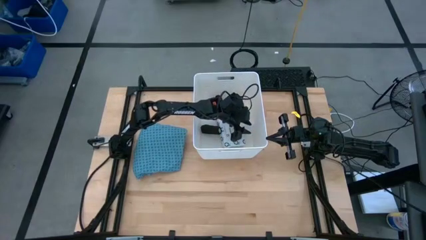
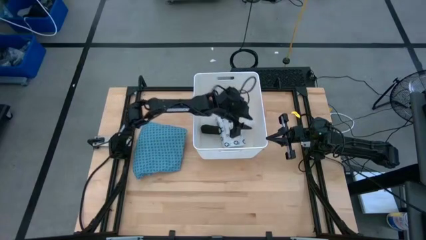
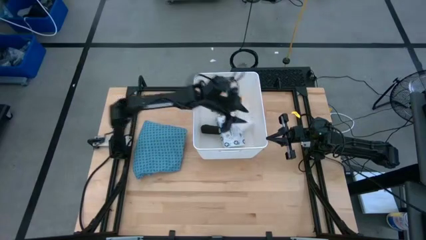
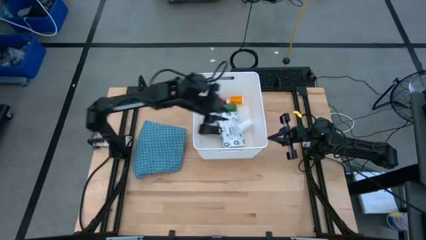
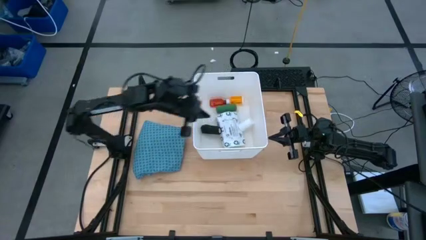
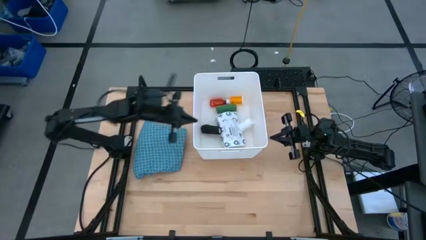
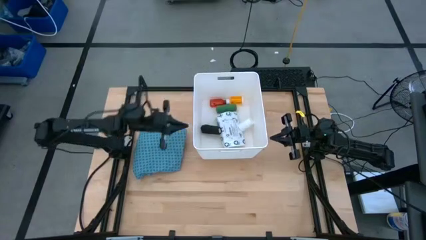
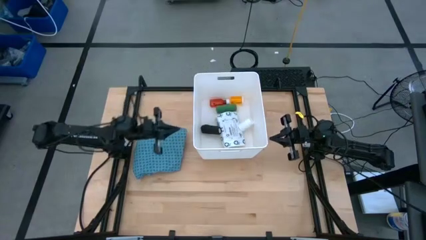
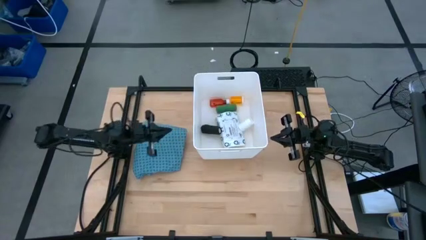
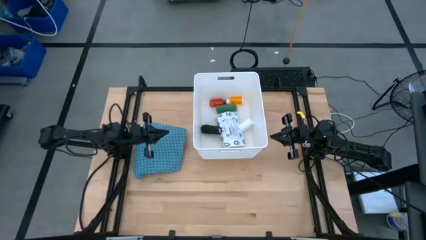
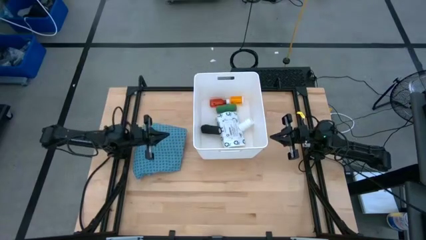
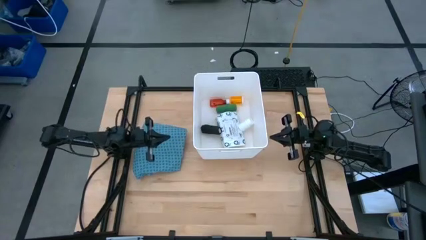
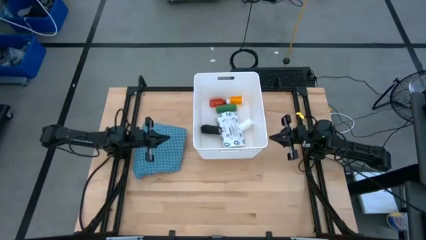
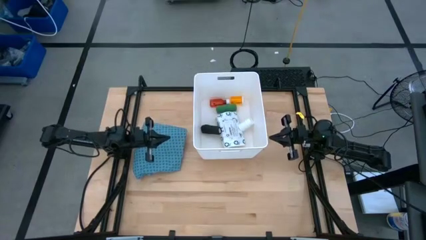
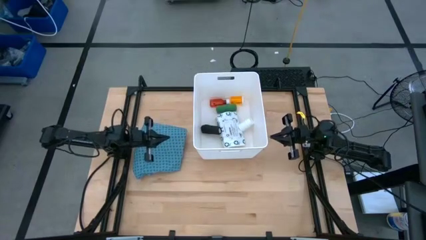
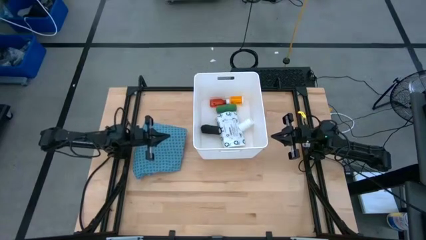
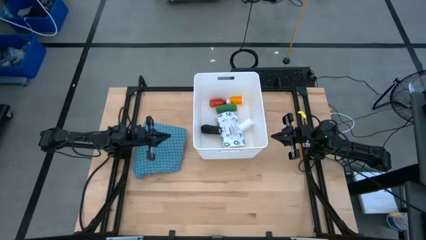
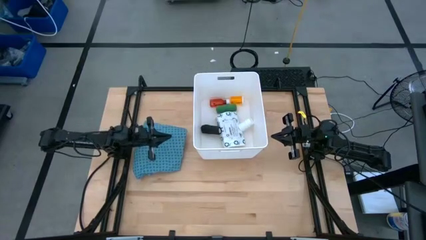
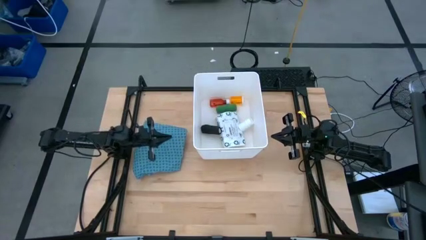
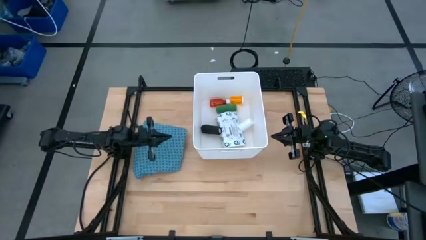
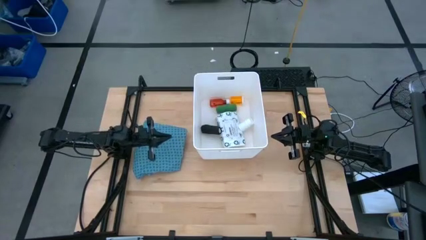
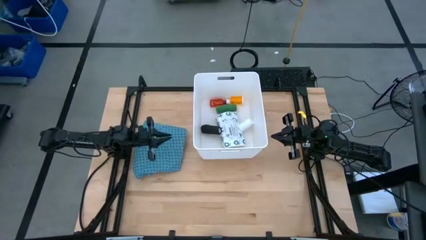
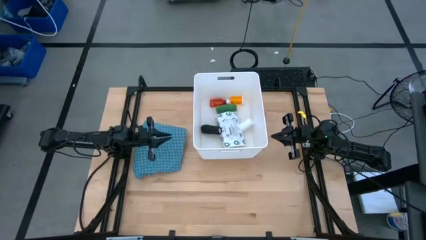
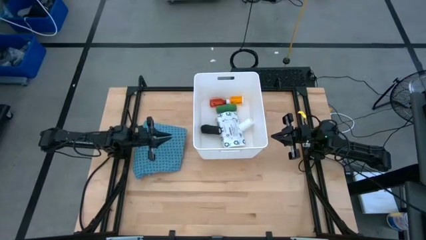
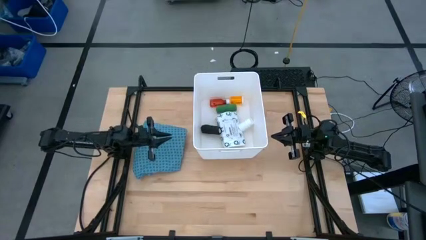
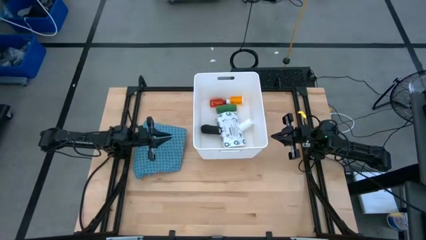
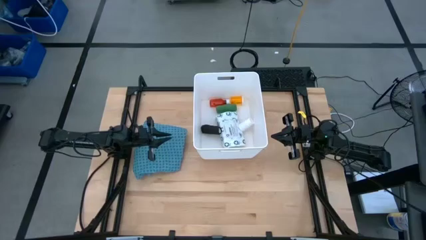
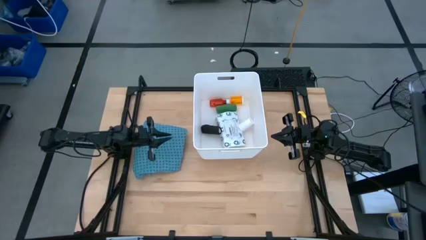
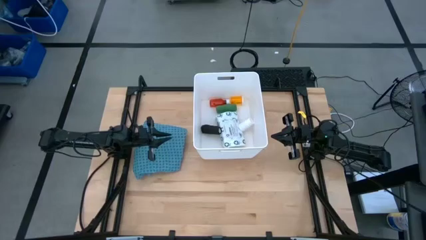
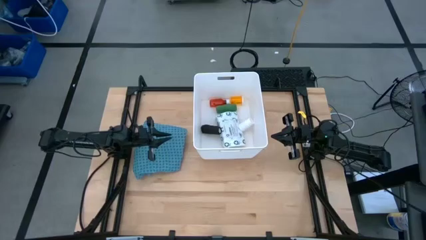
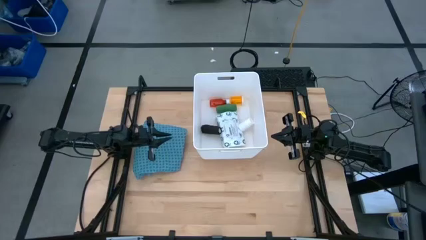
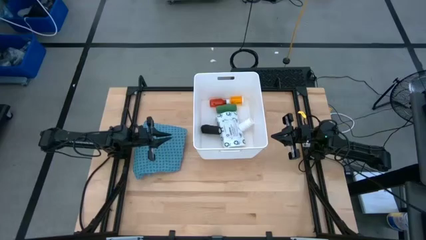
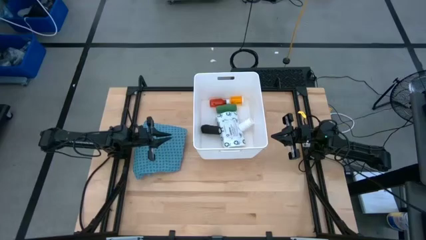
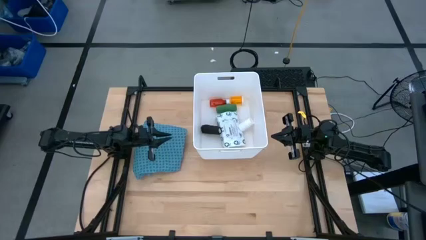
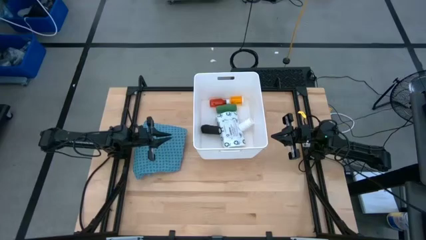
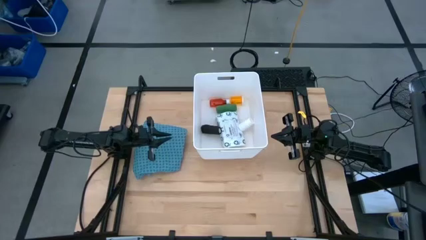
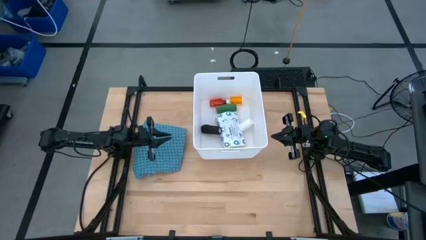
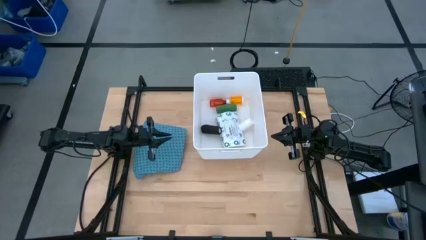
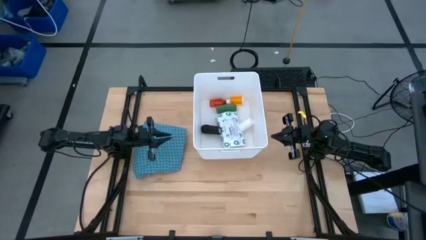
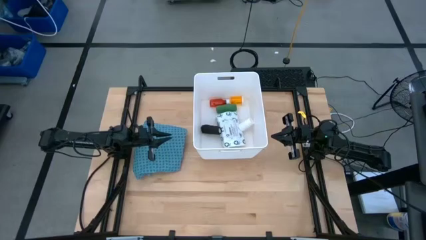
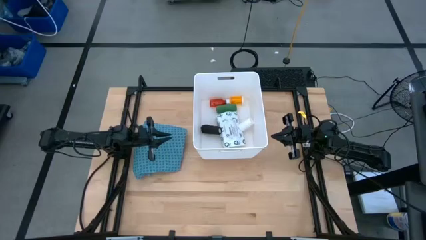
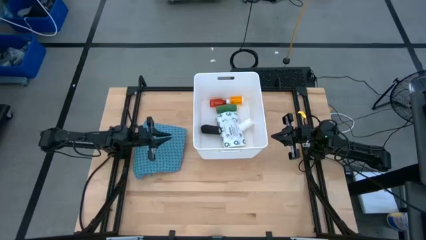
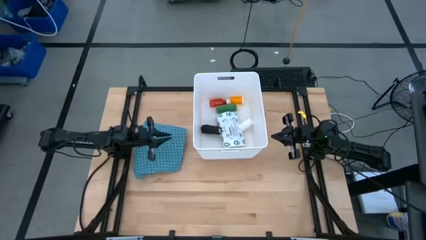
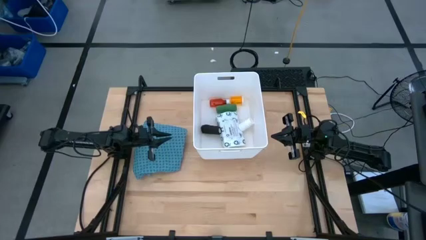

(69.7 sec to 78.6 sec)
Task: Pick & place medical supplies in basket/bin
Return to Home Position

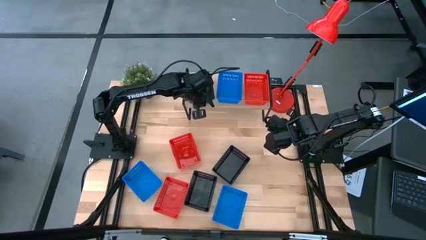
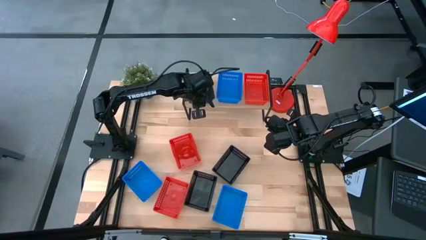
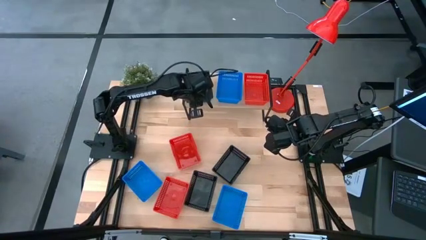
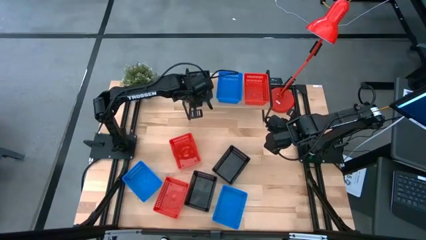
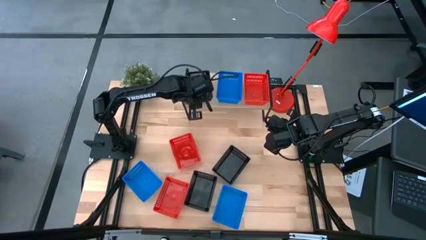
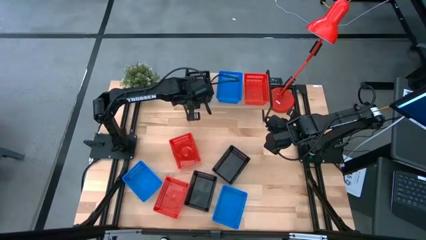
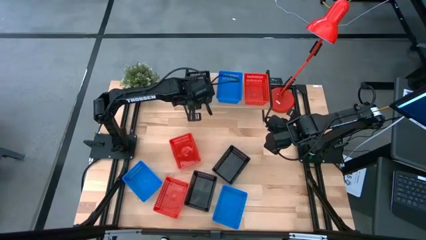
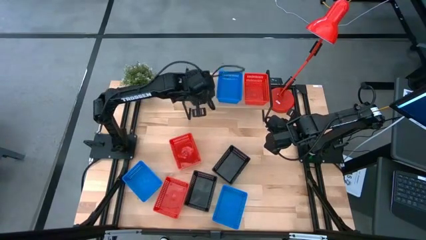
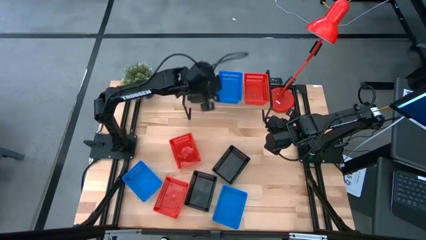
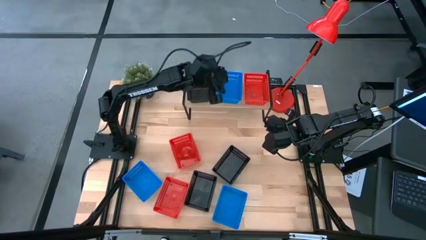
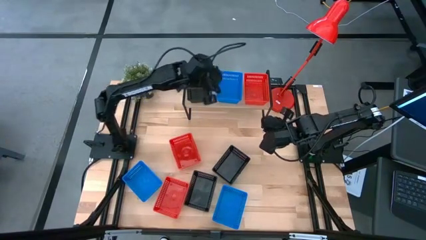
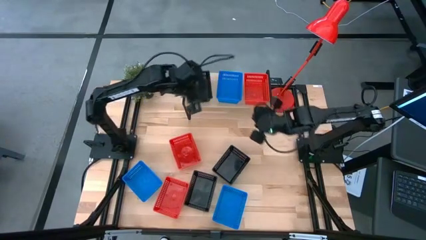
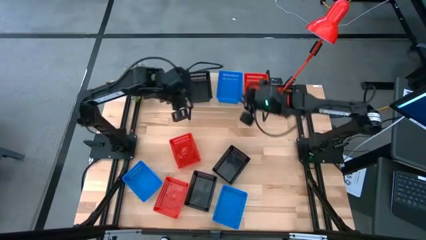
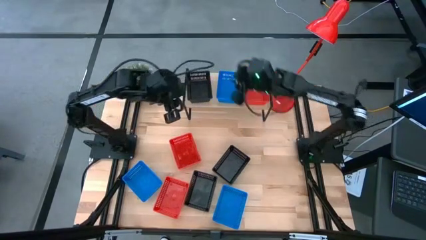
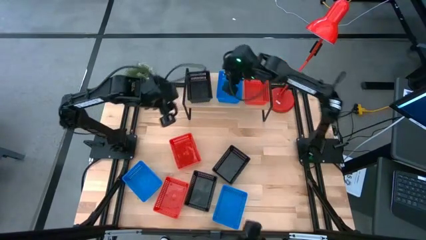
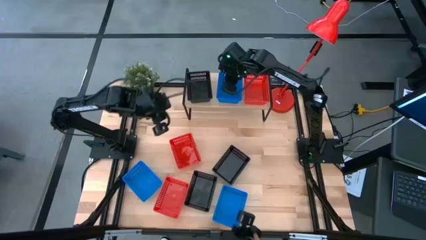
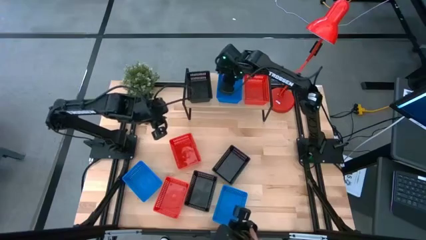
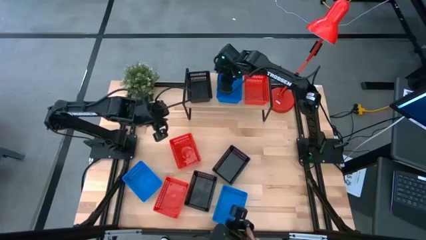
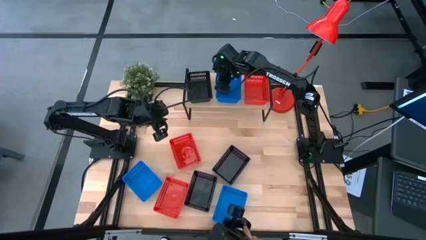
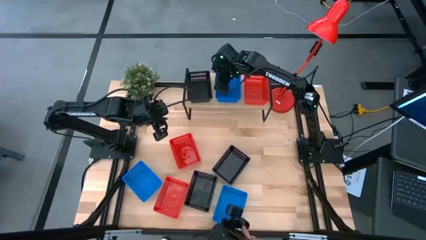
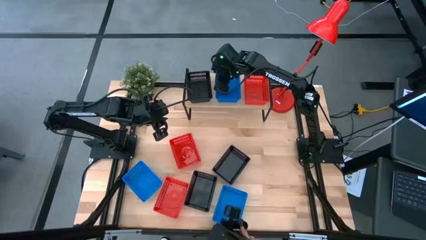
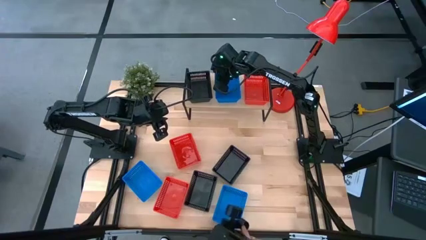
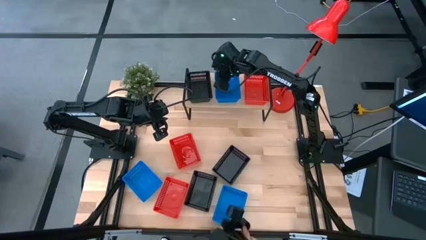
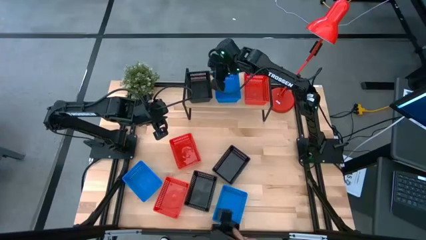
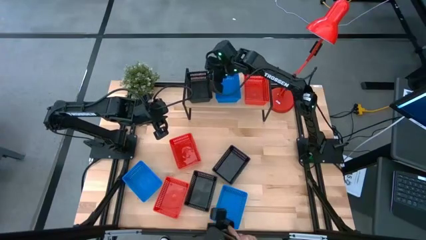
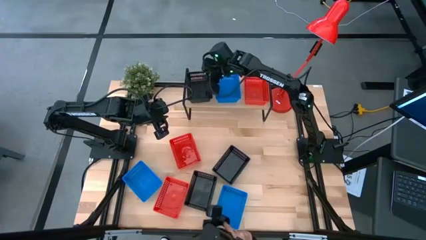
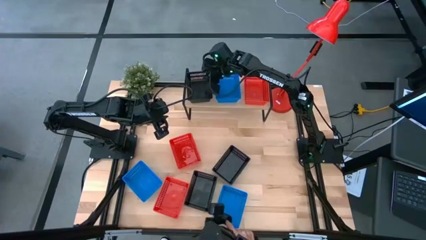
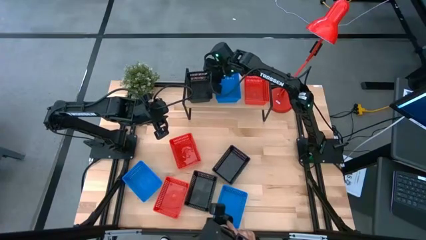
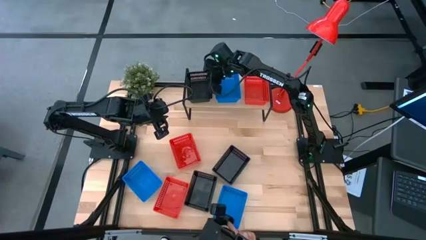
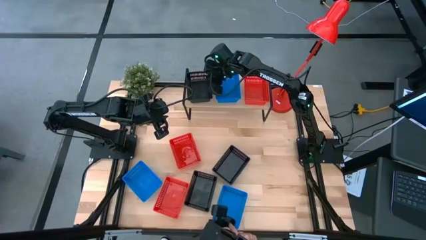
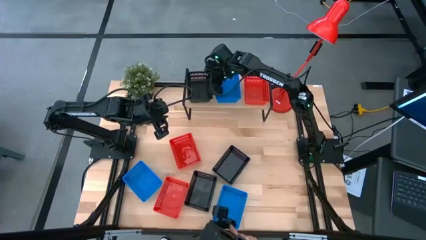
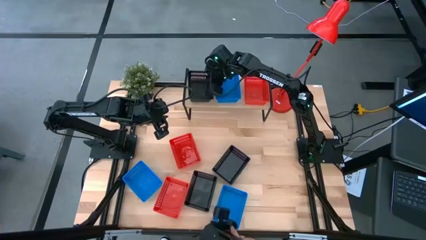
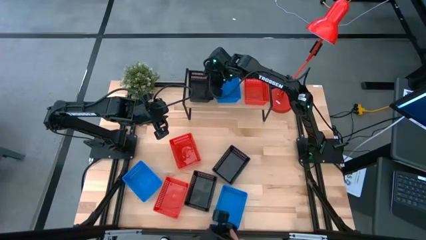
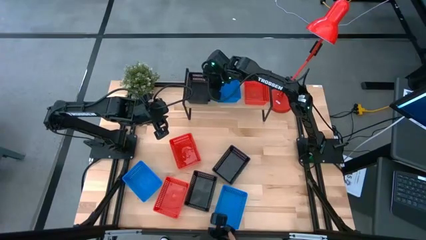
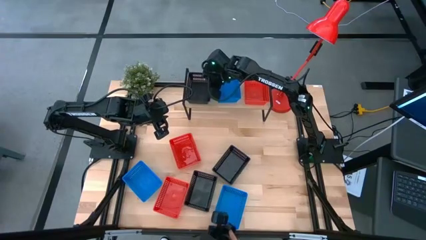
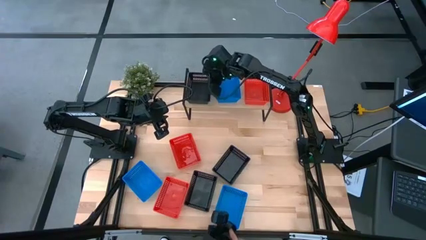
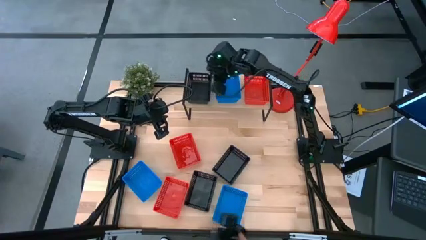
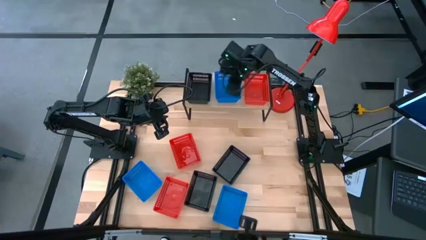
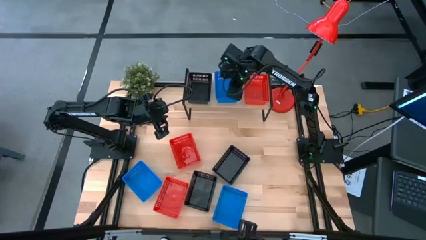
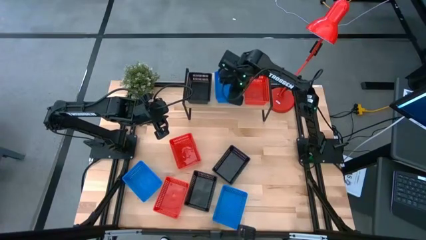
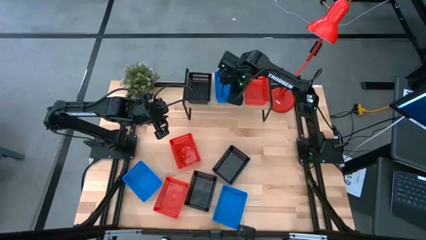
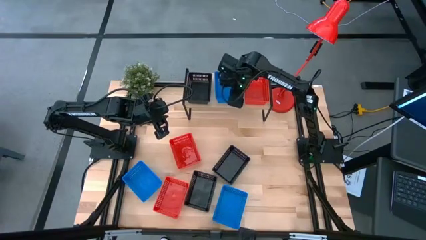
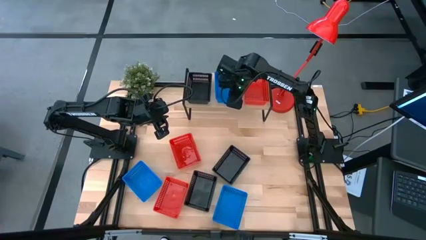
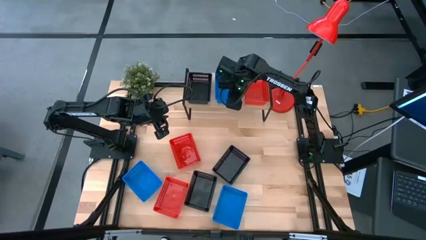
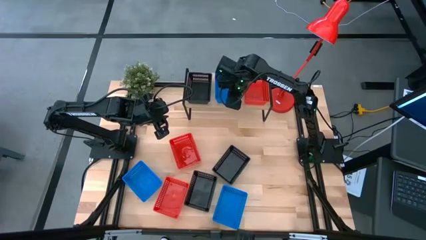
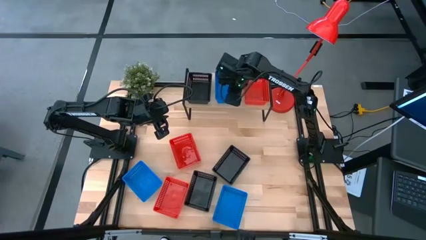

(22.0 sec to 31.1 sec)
Task: Stack baskets on shelf by color
Adjust the baskets on the shelf
